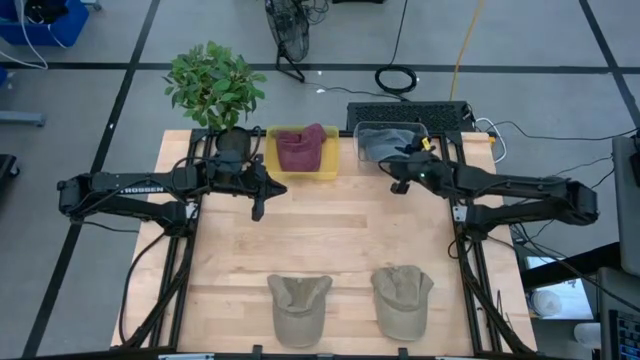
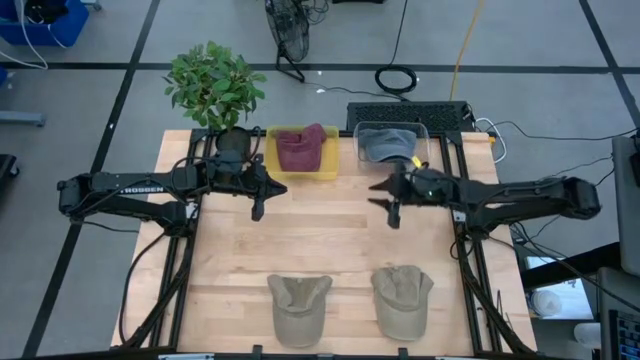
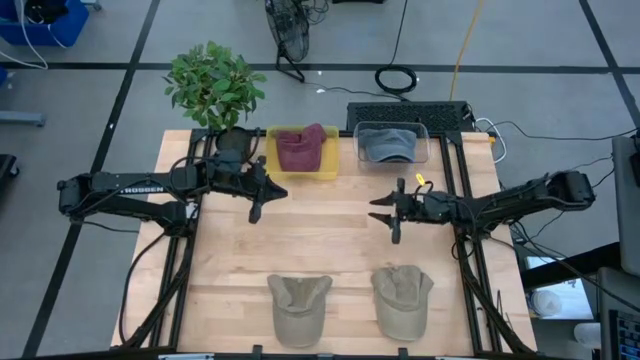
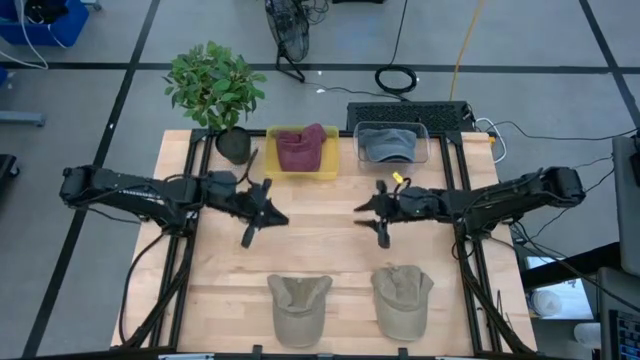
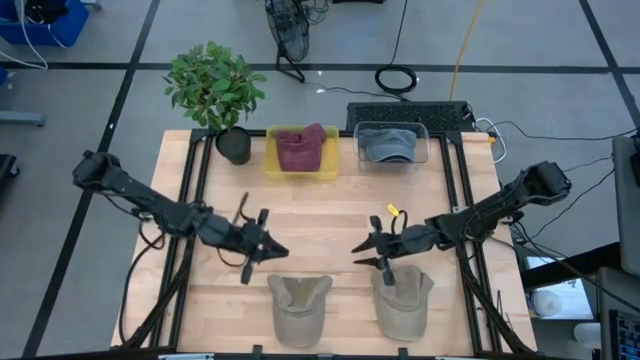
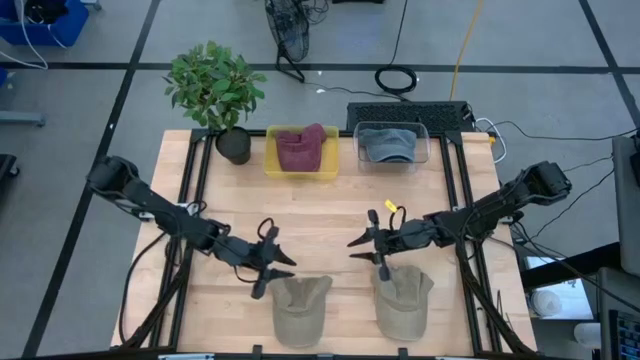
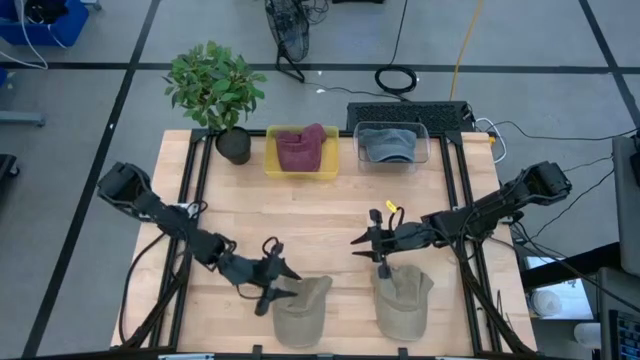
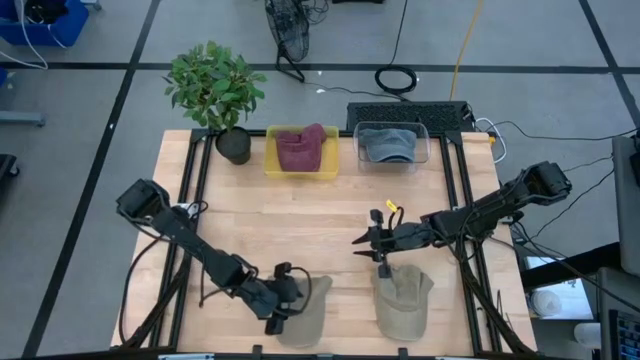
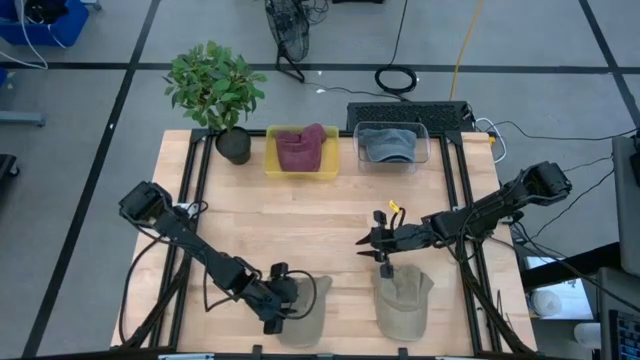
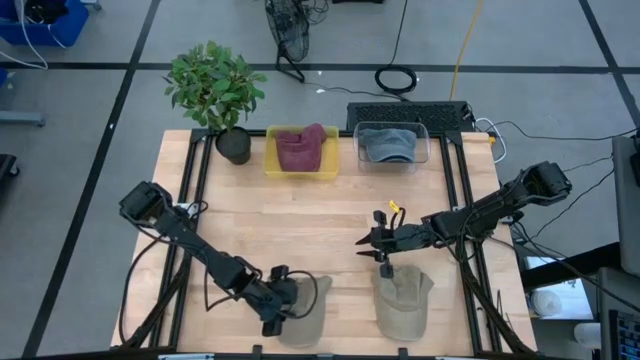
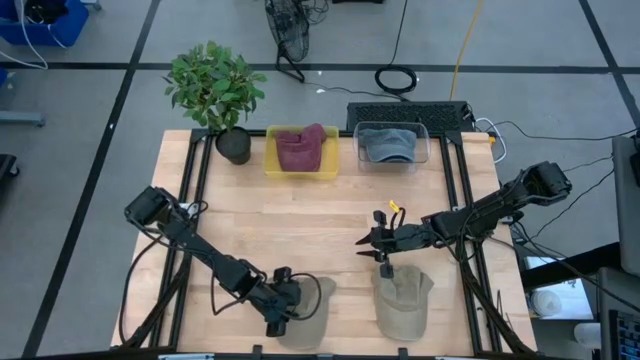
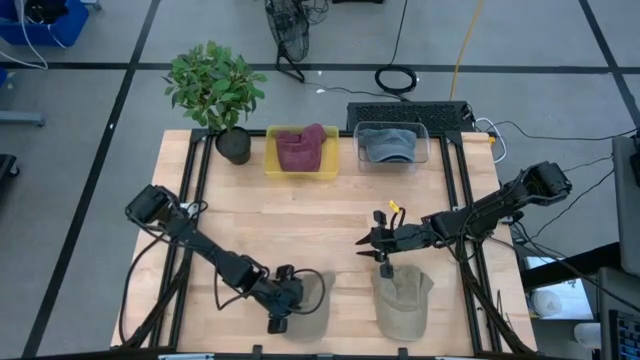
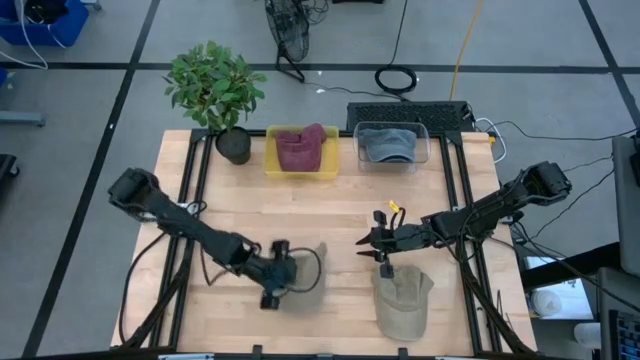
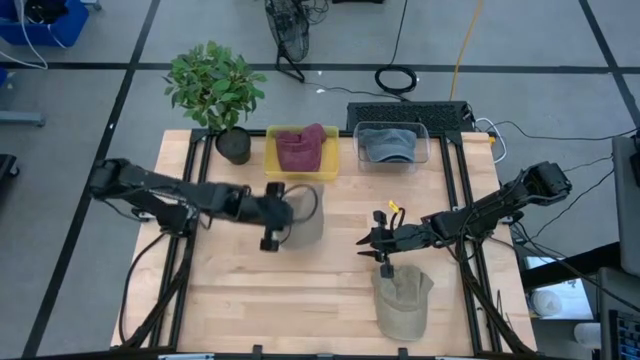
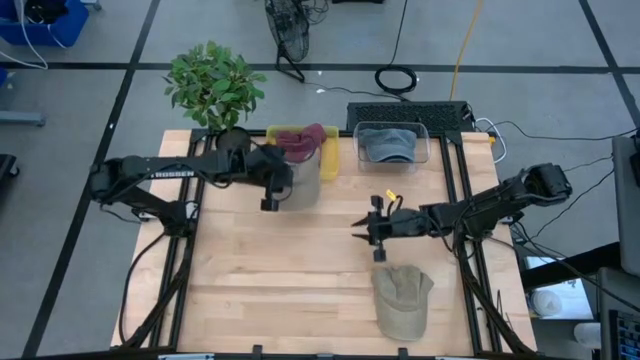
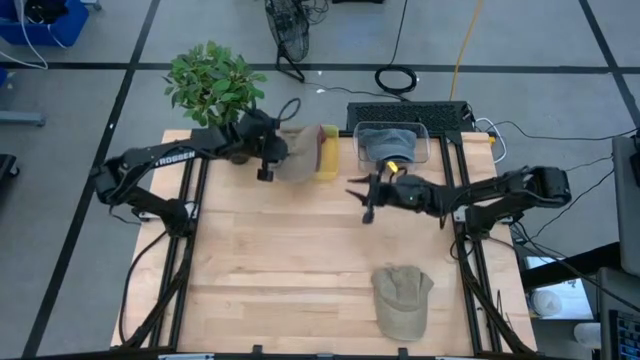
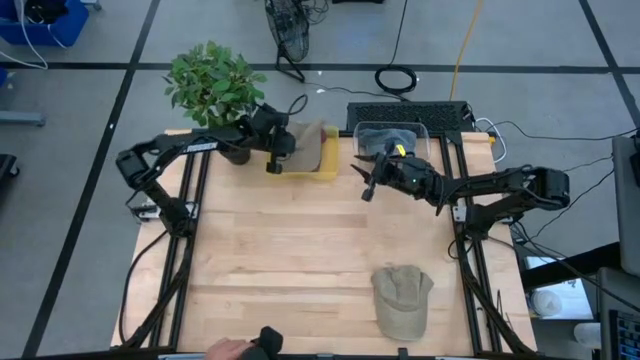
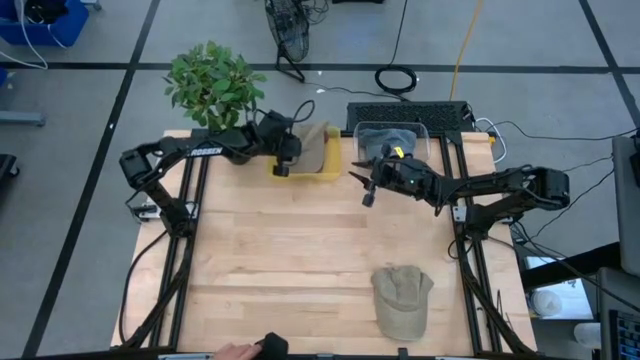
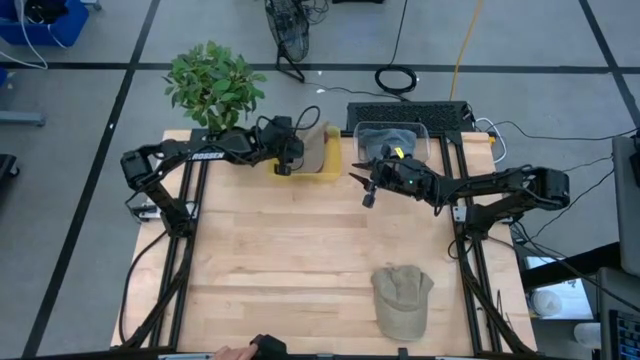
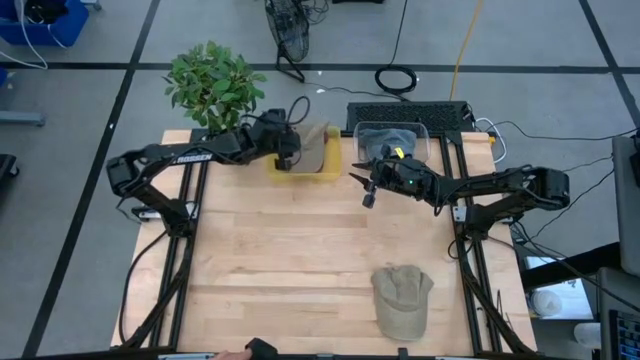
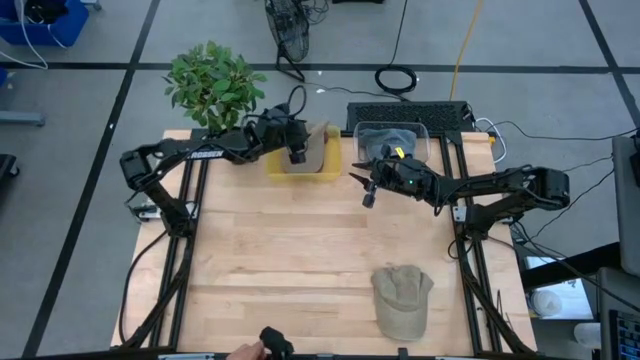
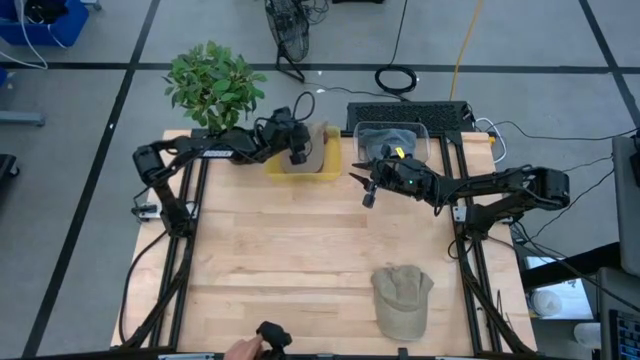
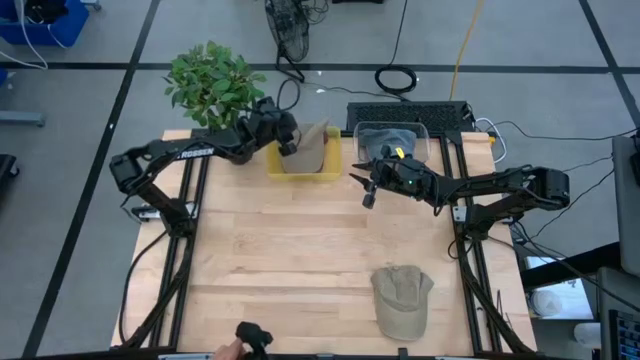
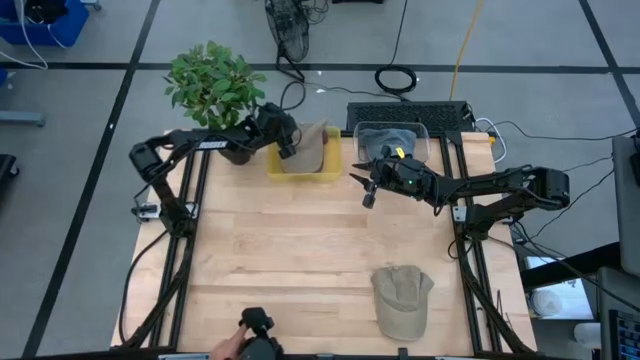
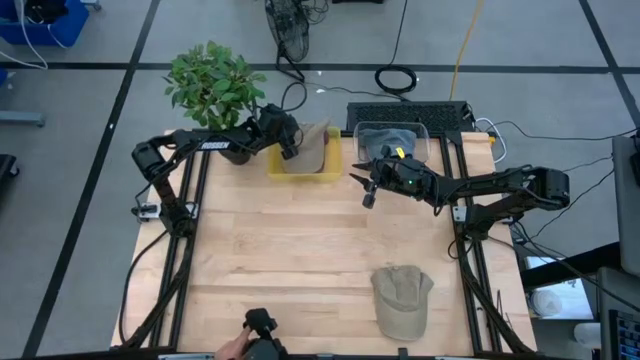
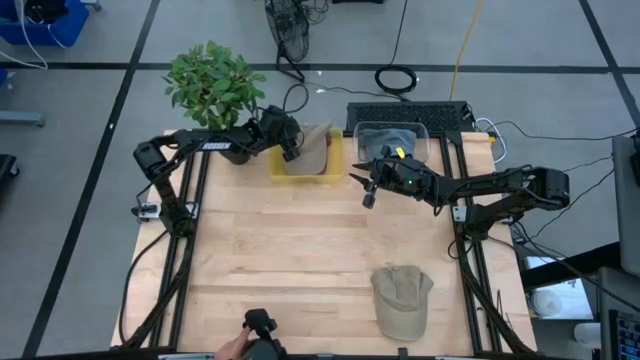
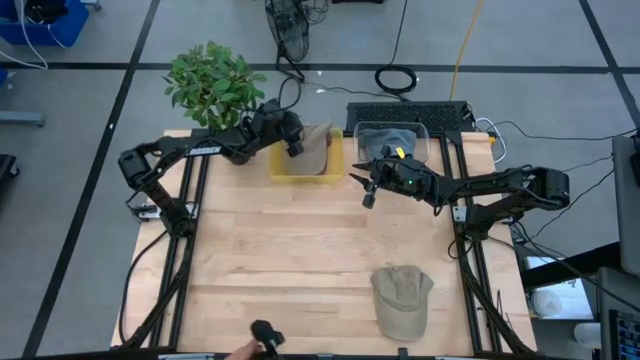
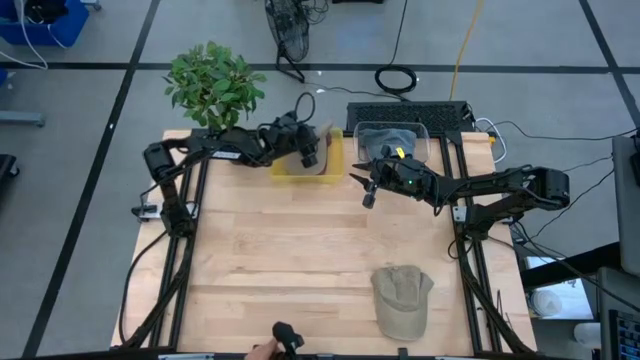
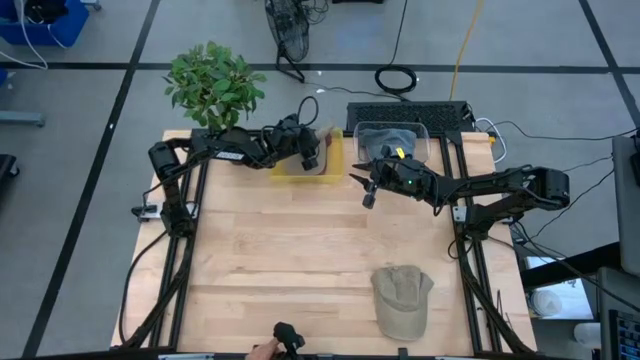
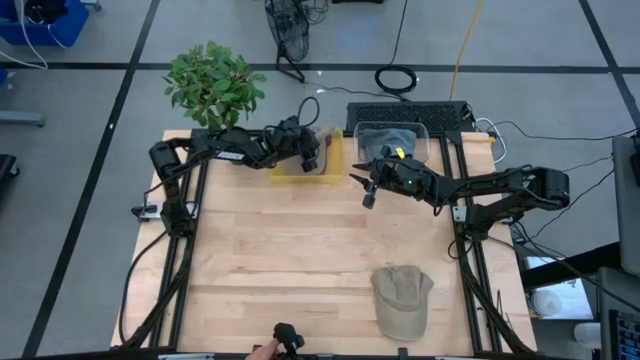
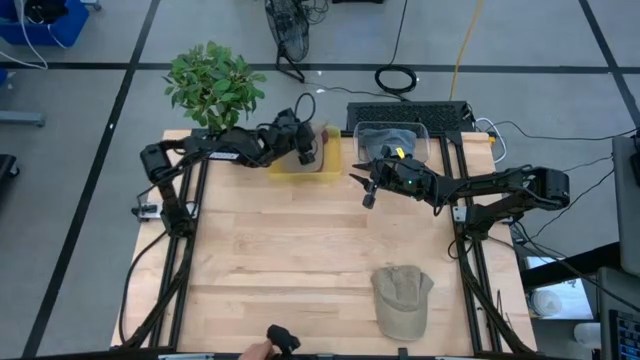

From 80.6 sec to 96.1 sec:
Task: Pick & Place hat
Put the left brown cap into the yellow bin

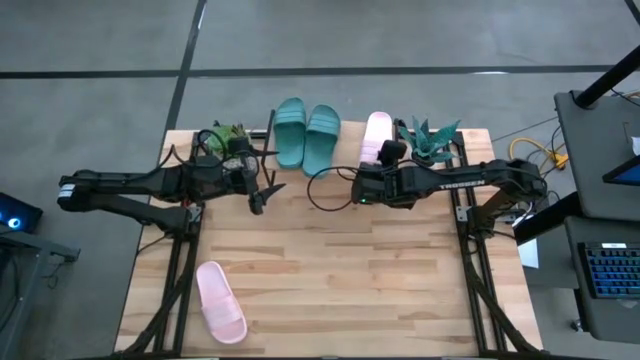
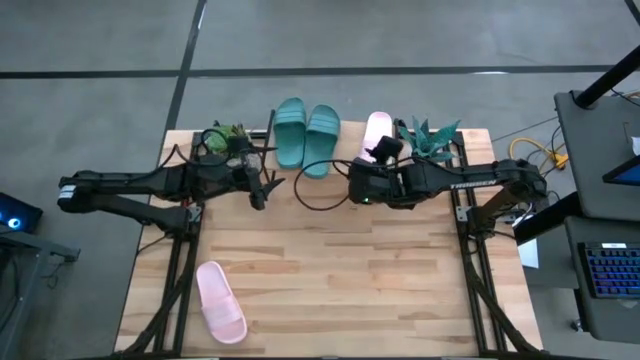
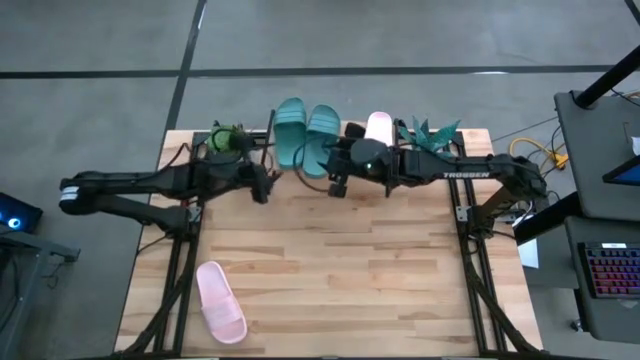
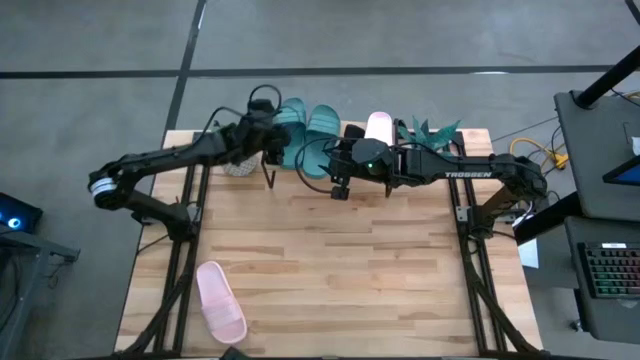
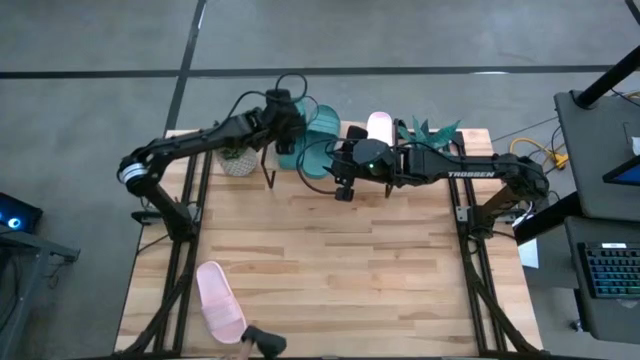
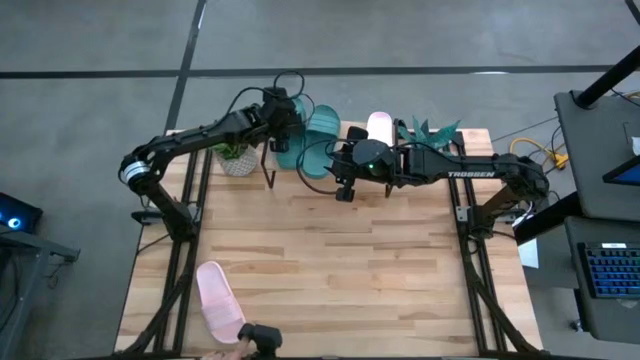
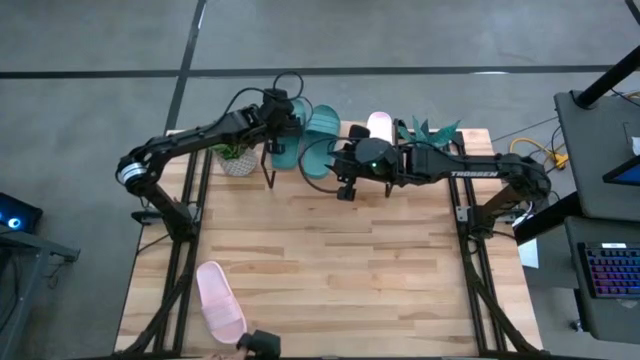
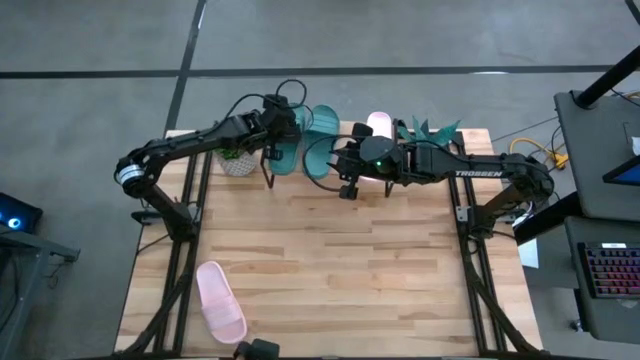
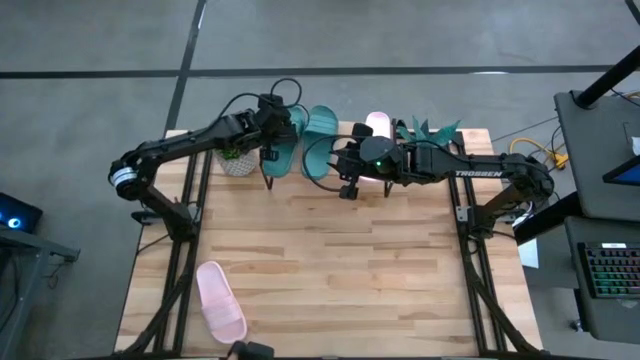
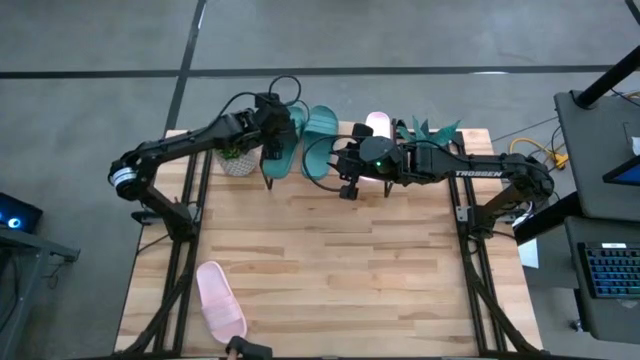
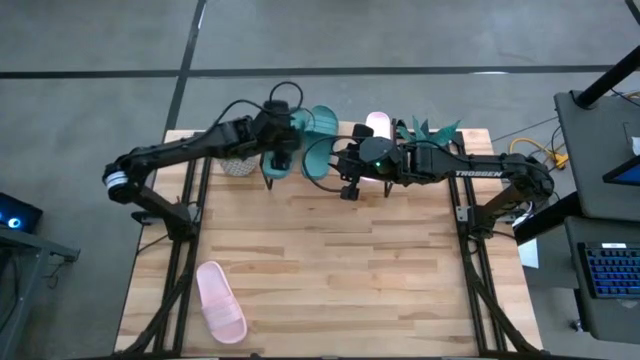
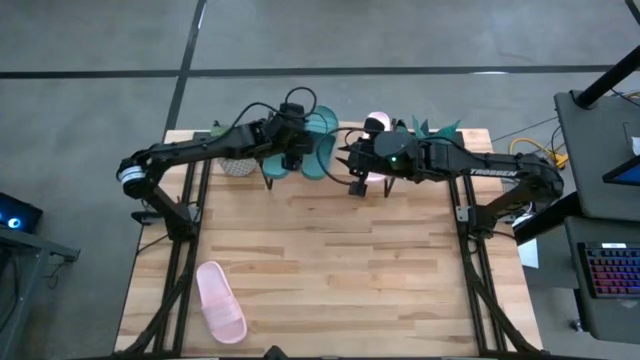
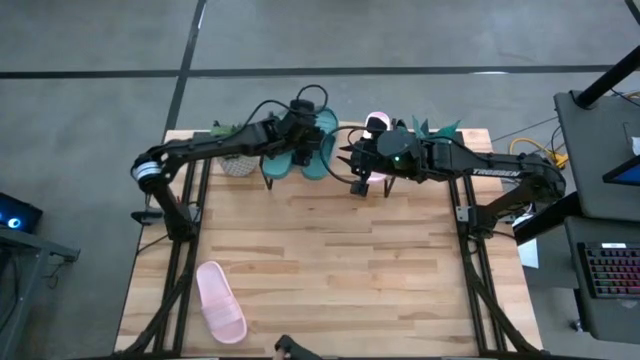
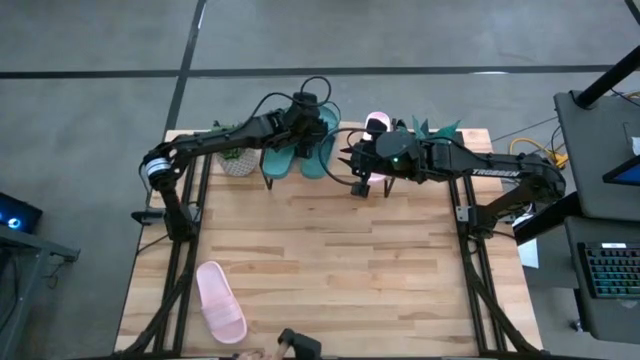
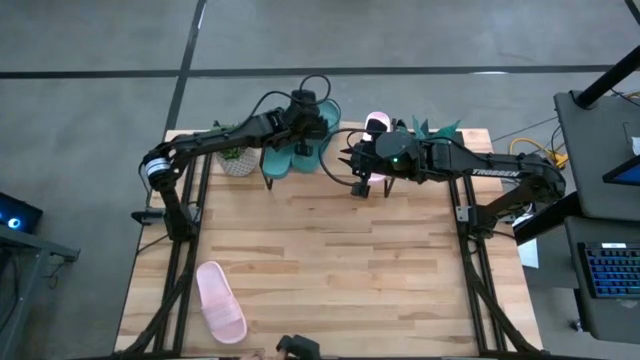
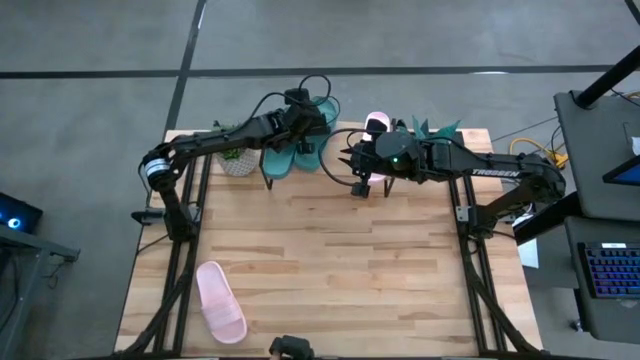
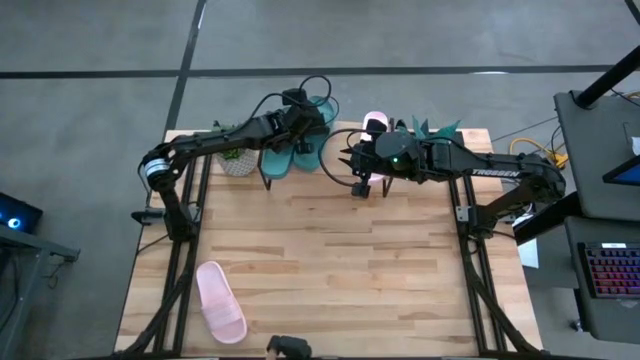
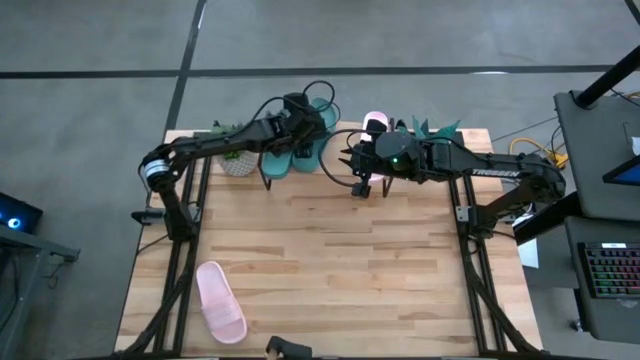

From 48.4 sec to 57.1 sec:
Task: Pick and place slides into the shelf
Adjust the green slides on the shelf
